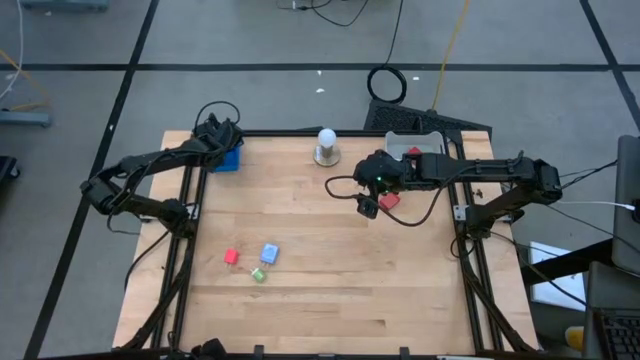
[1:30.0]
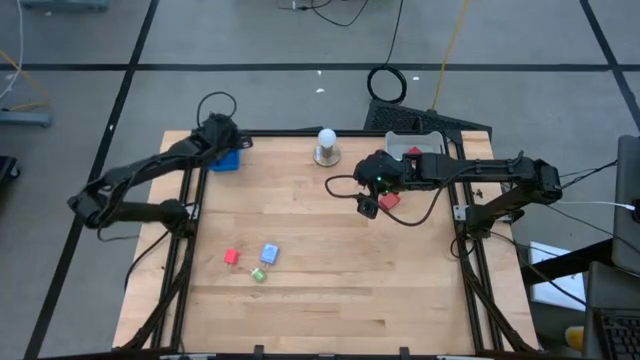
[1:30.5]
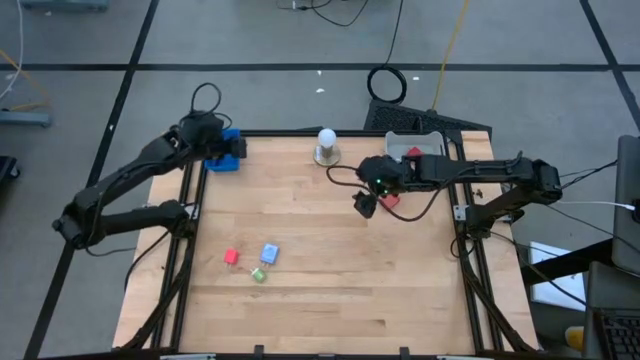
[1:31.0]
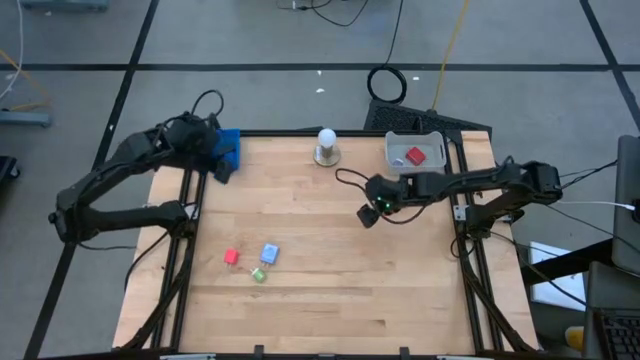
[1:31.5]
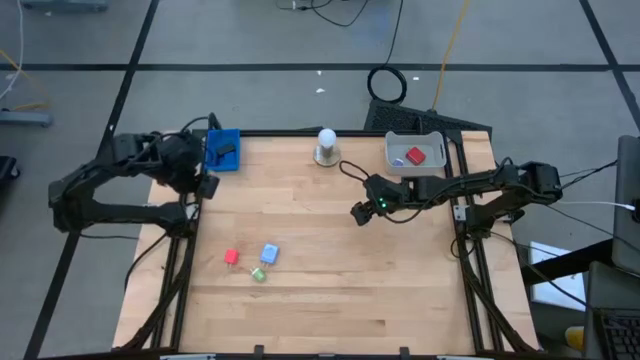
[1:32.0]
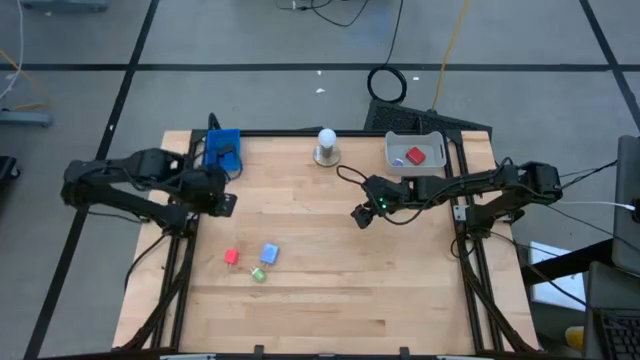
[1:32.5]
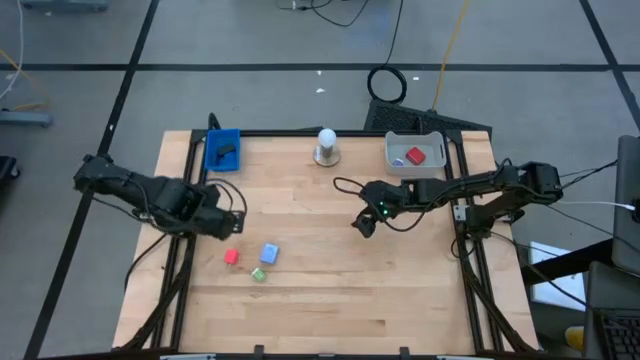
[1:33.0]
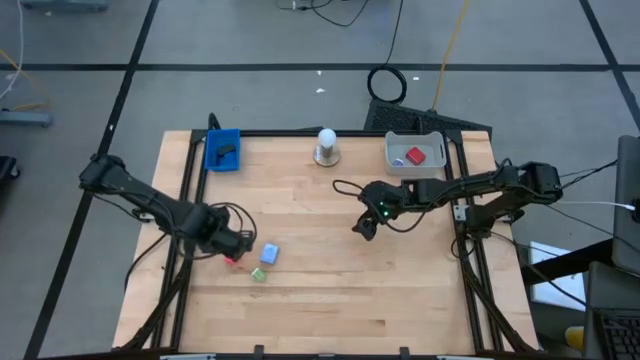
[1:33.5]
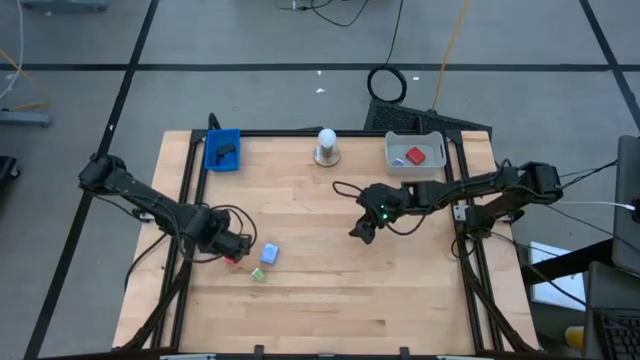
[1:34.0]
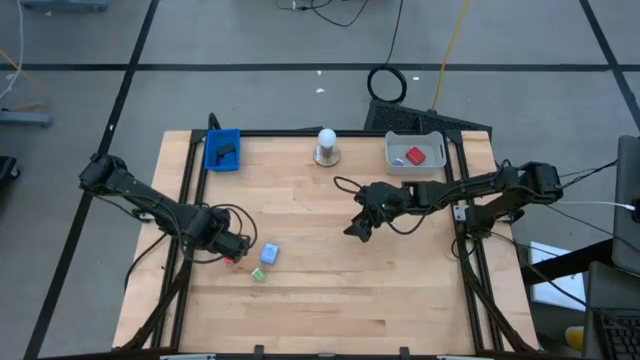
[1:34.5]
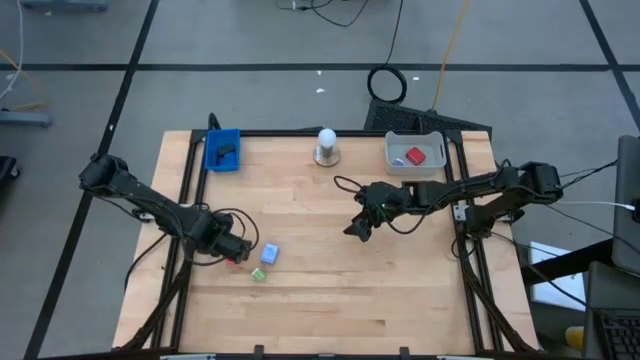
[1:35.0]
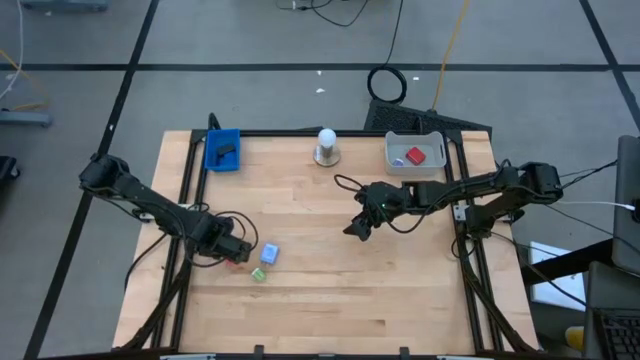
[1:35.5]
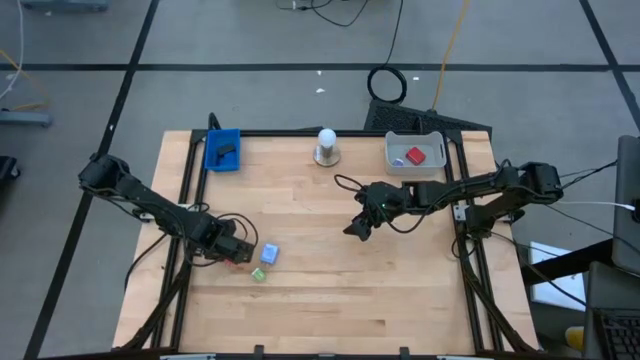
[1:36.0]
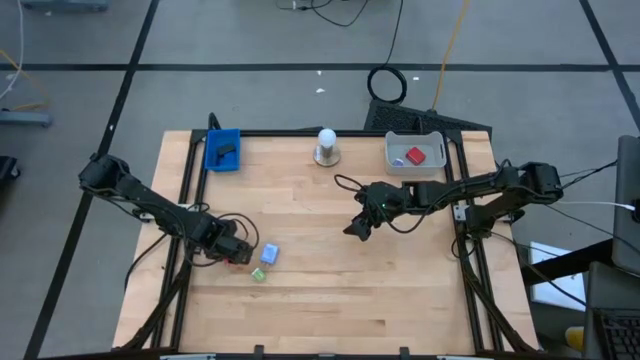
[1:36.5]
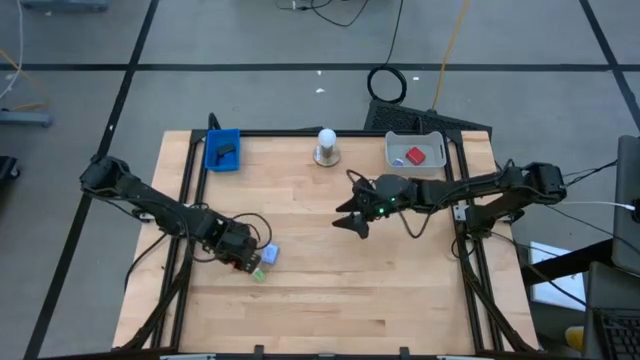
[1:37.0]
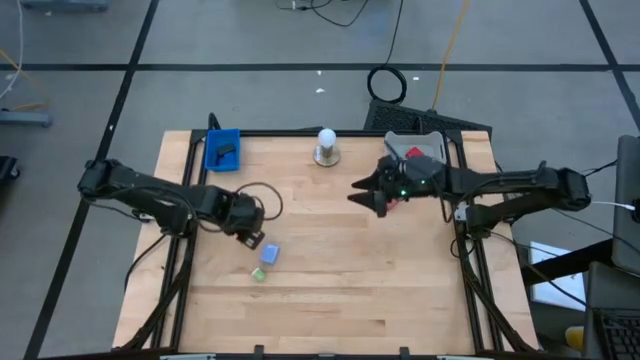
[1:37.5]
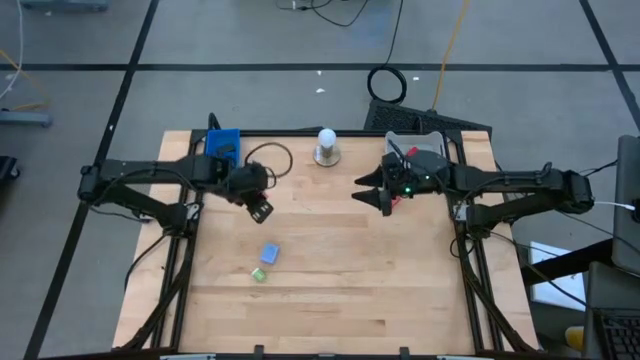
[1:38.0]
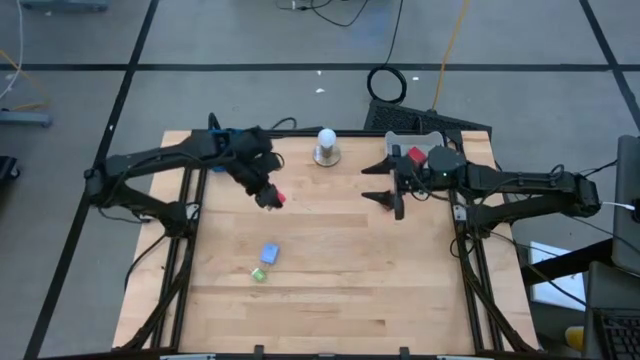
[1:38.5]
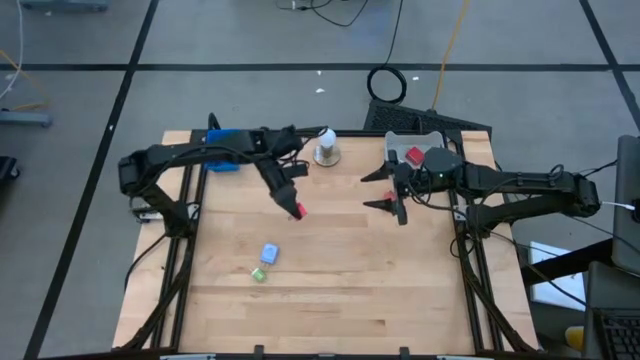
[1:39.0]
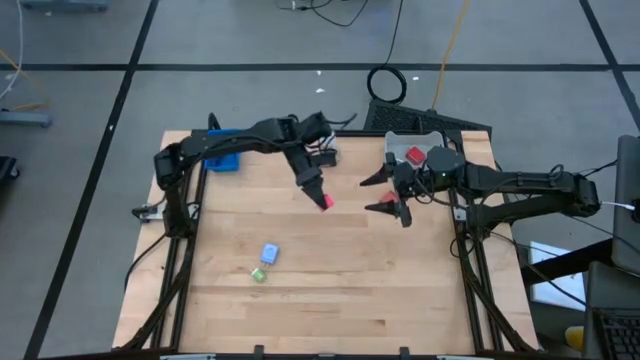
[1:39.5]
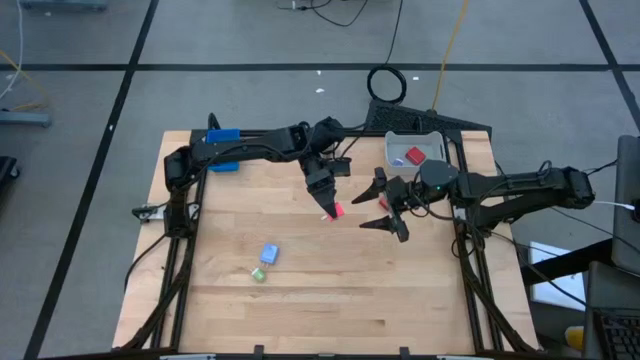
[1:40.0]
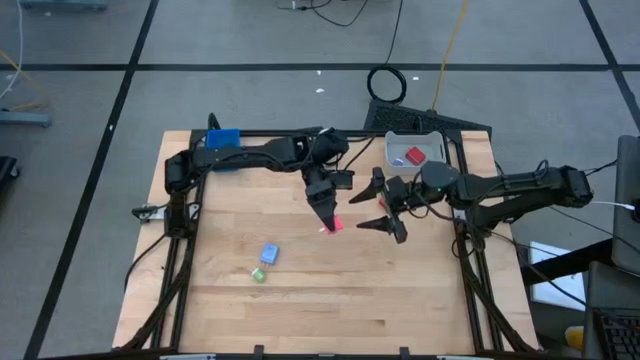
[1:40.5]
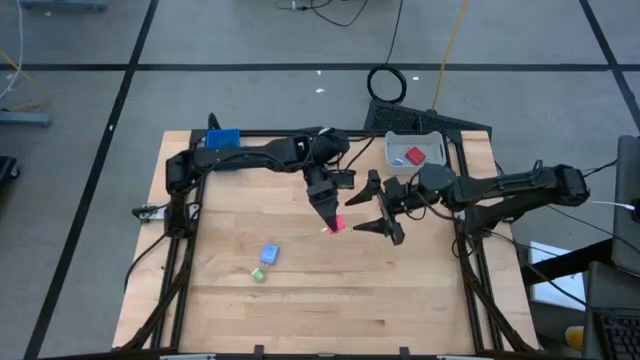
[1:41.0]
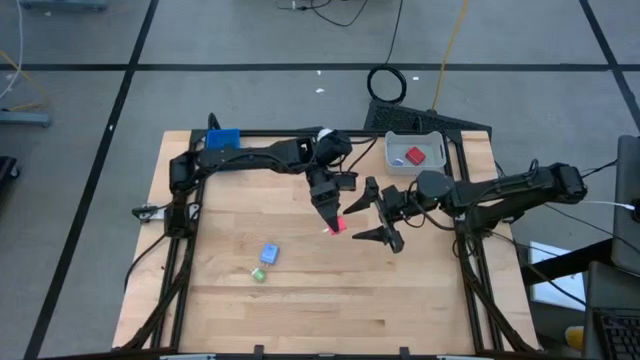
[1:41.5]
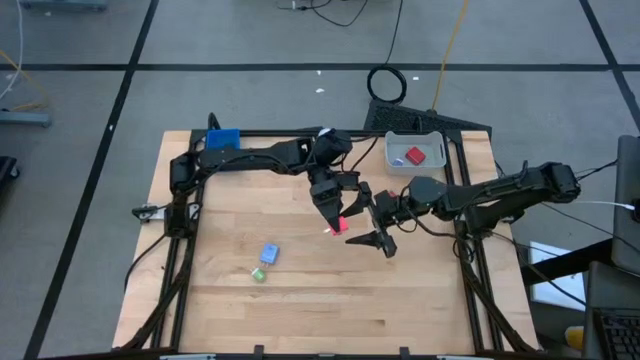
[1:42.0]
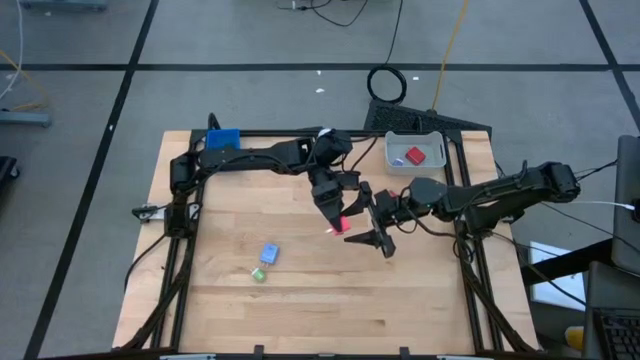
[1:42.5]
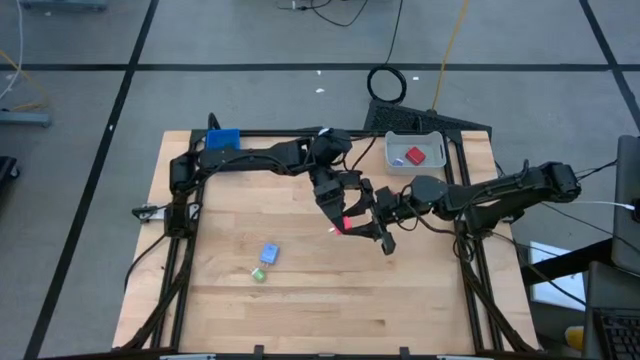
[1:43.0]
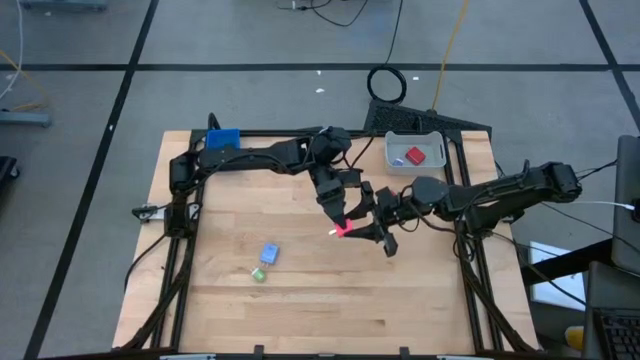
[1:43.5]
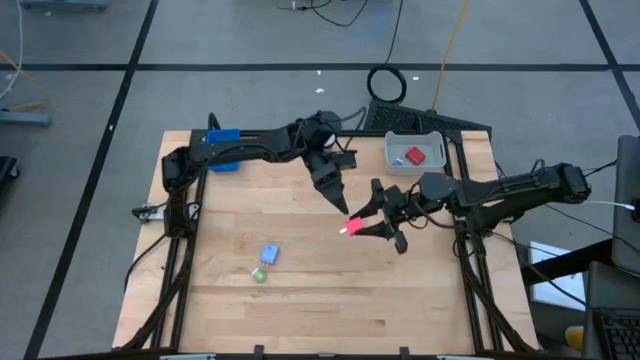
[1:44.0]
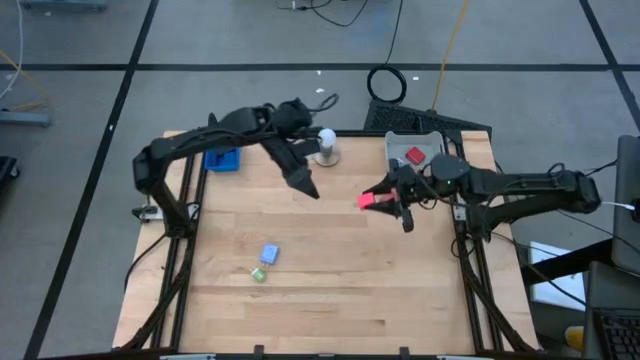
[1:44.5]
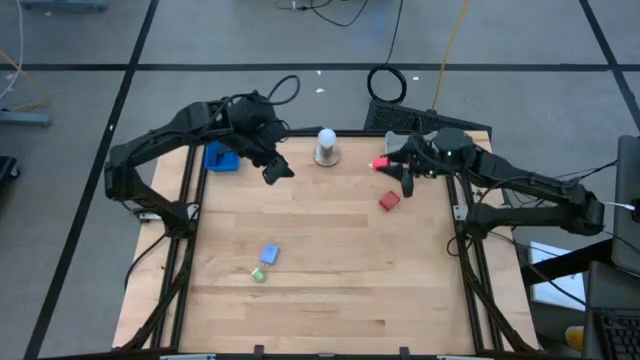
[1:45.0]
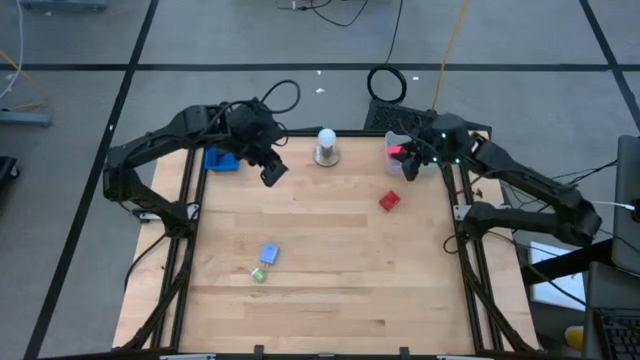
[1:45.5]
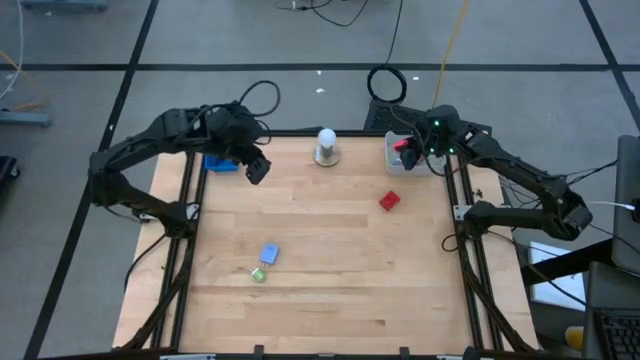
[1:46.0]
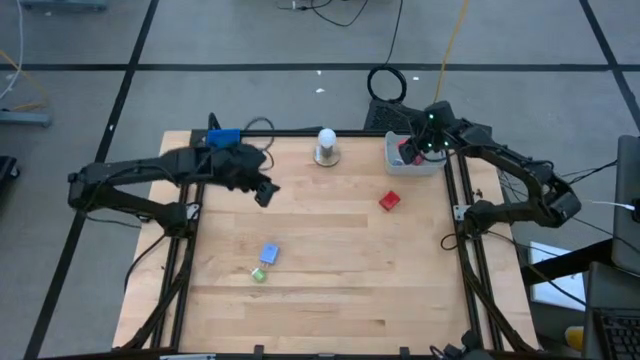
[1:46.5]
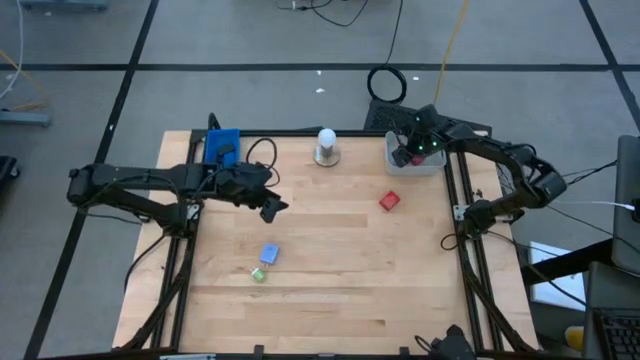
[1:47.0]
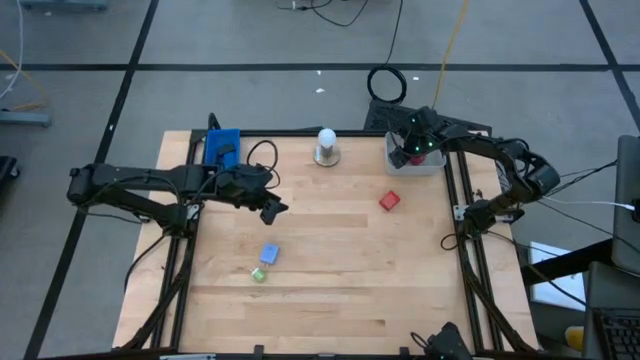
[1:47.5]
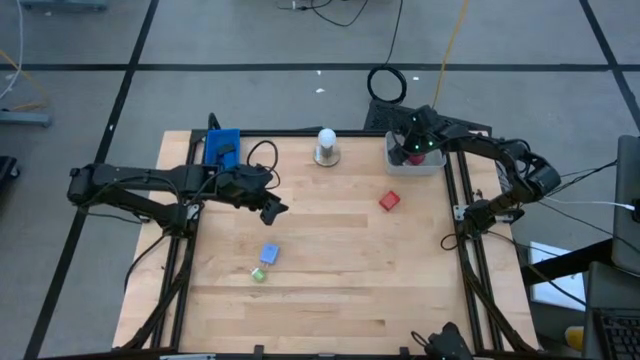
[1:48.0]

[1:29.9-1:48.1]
Task: Pick & Place Office items
Put the pink charger adapter into the gray bin

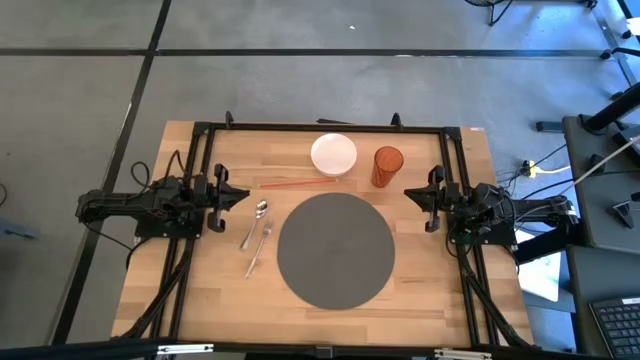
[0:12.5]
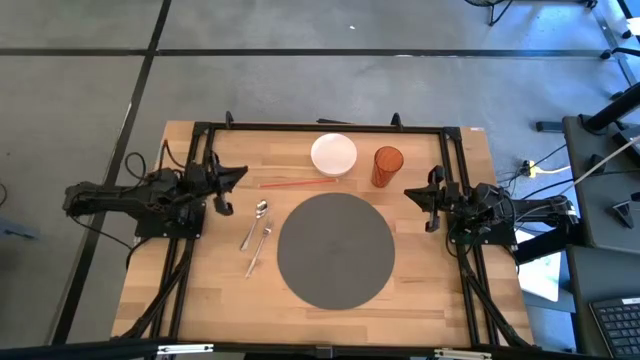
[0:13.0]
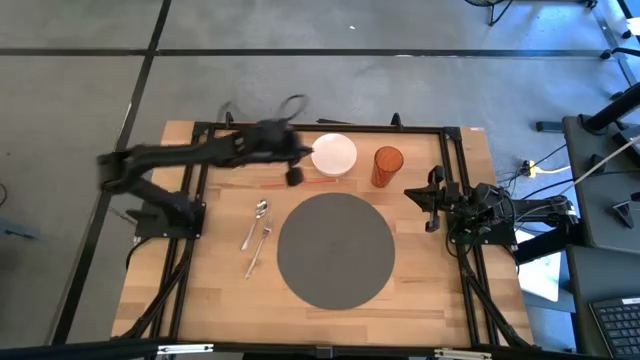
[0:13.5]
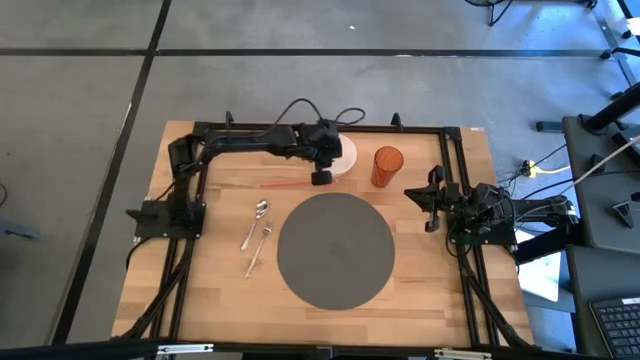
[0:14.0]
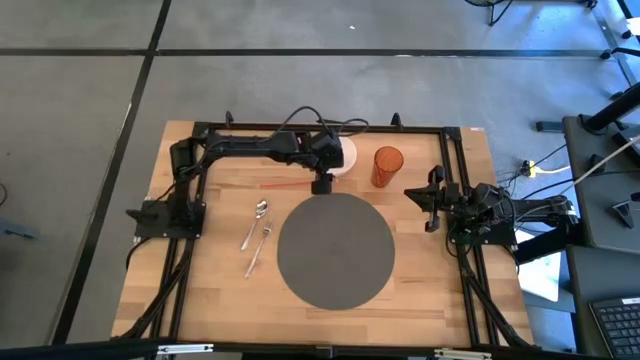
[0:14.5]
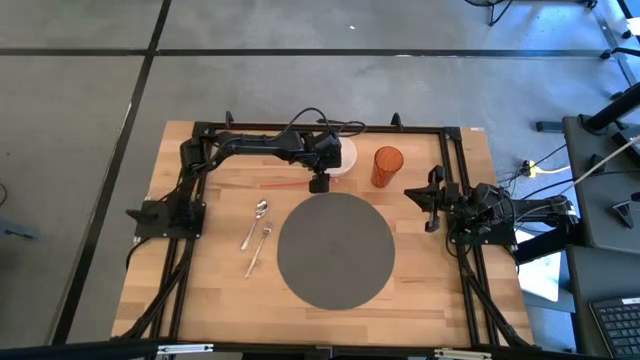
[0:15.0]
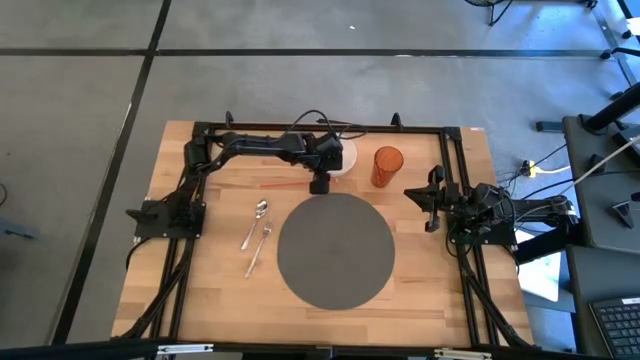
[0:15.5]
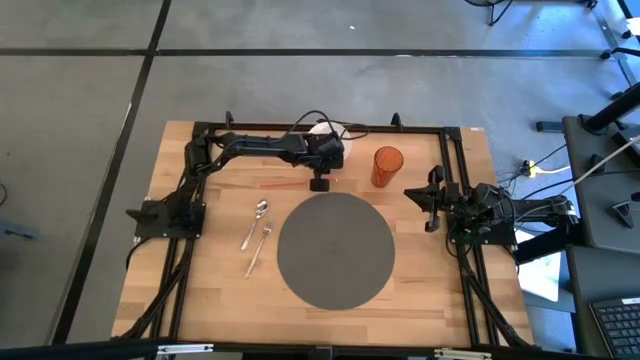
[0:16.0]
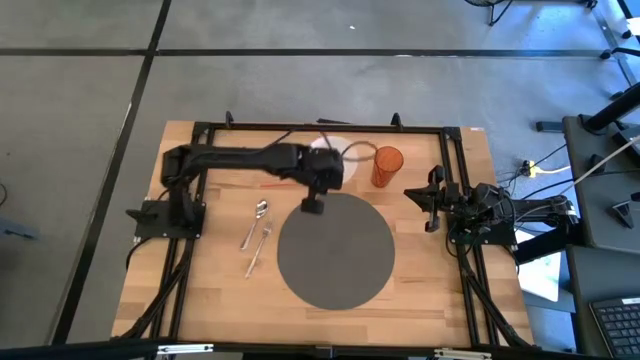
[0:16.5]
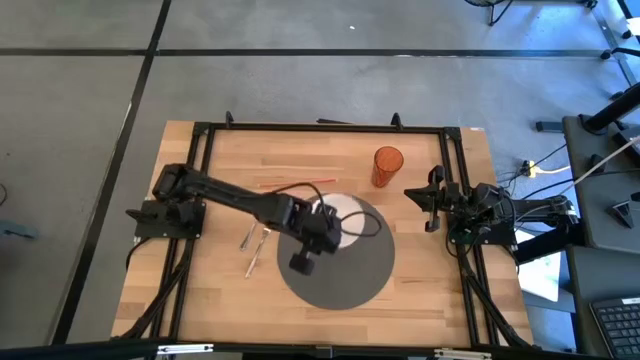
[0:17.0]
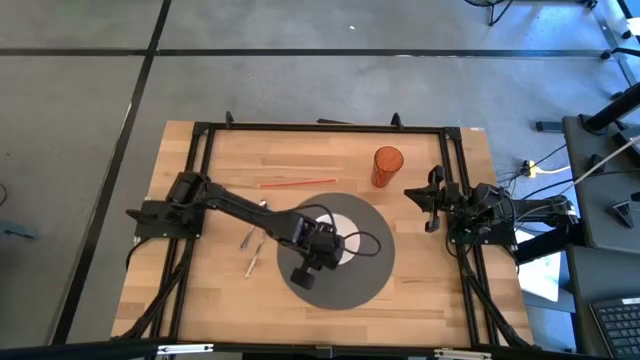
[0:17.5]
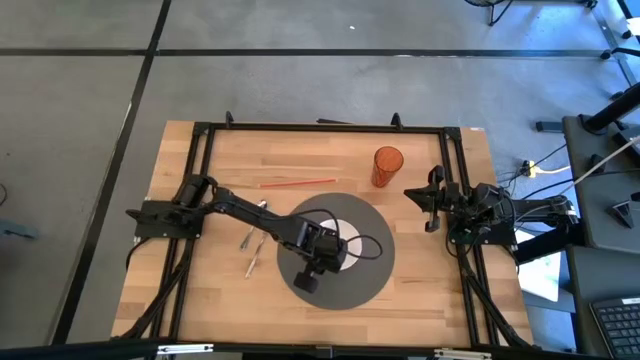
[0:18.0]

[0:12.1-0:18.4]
Task: Pick & Place Utensil
Put the white bowl on the center of the gray mat
